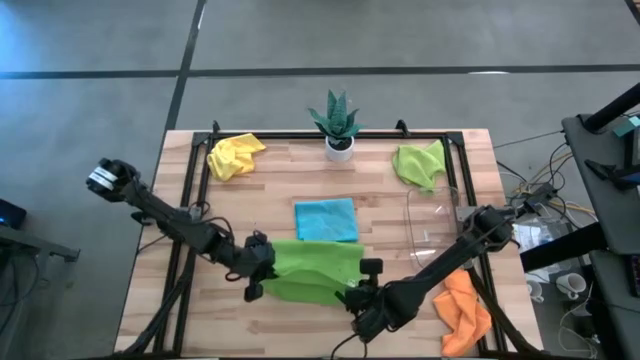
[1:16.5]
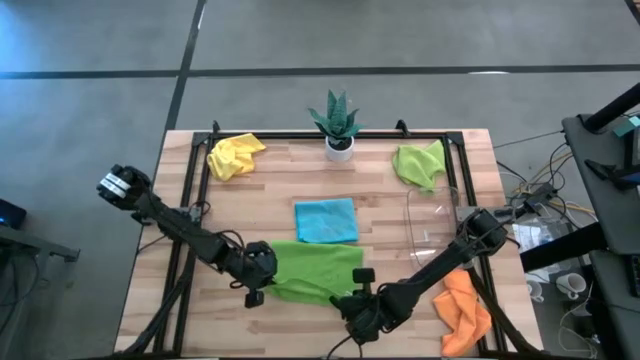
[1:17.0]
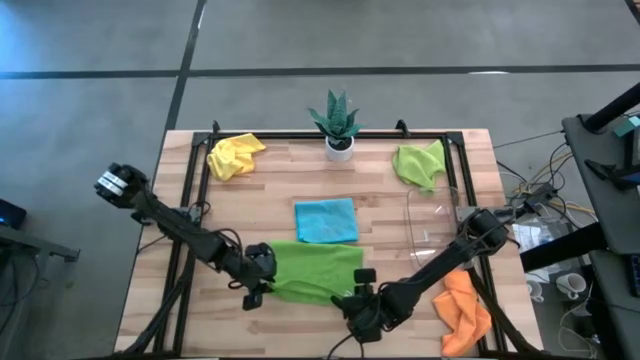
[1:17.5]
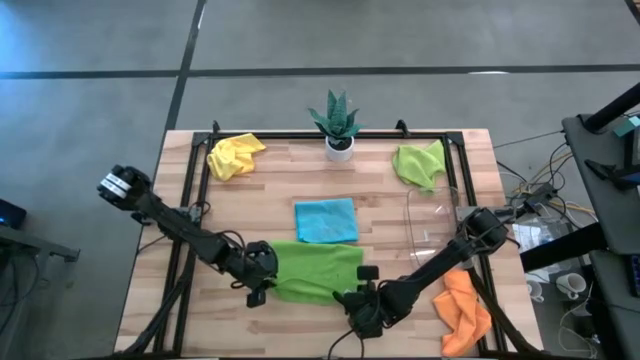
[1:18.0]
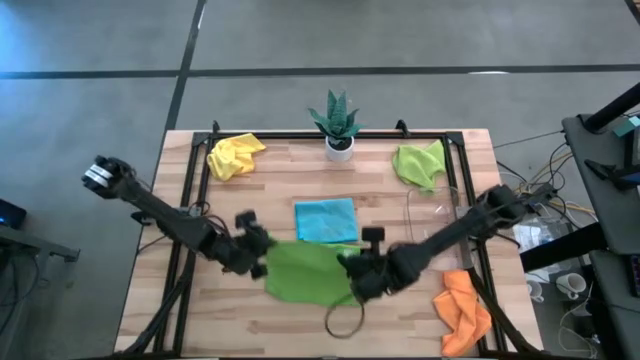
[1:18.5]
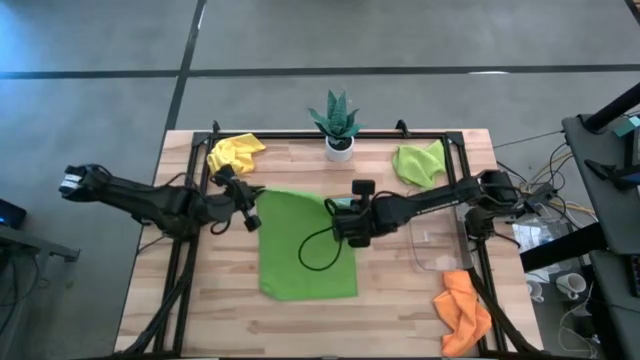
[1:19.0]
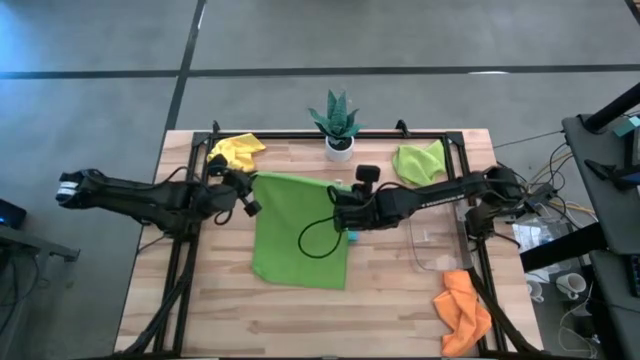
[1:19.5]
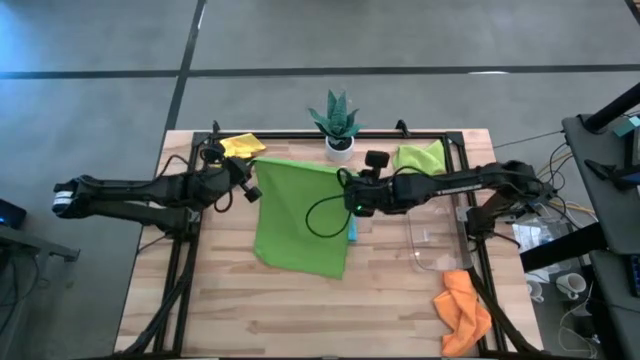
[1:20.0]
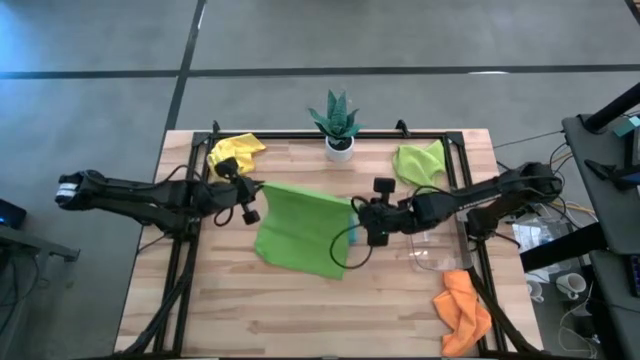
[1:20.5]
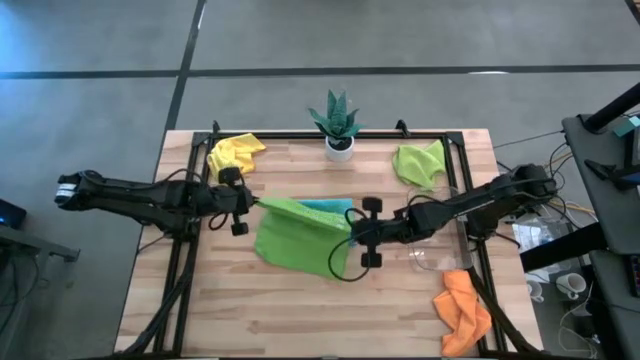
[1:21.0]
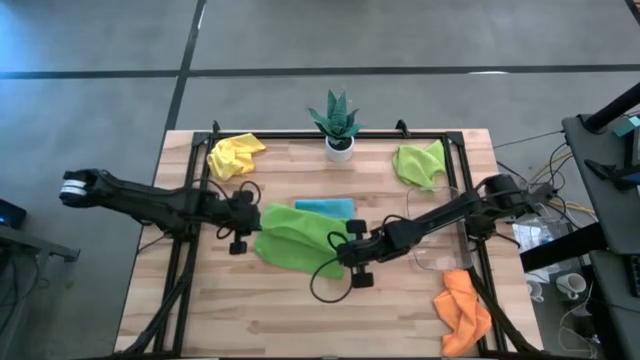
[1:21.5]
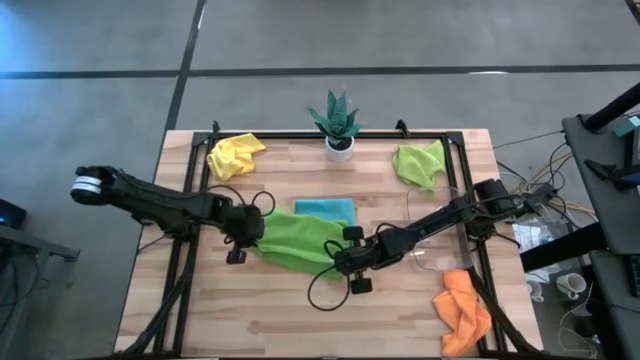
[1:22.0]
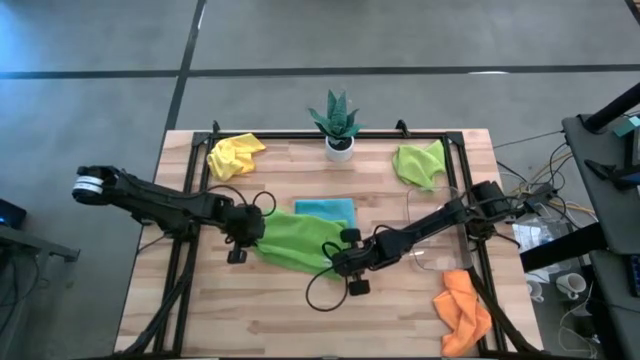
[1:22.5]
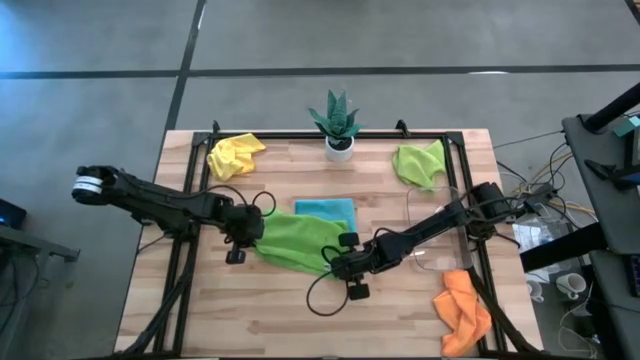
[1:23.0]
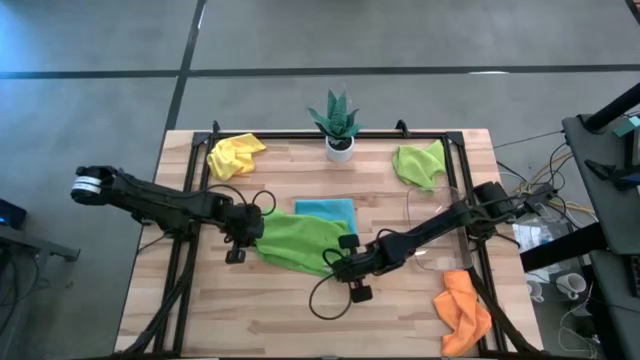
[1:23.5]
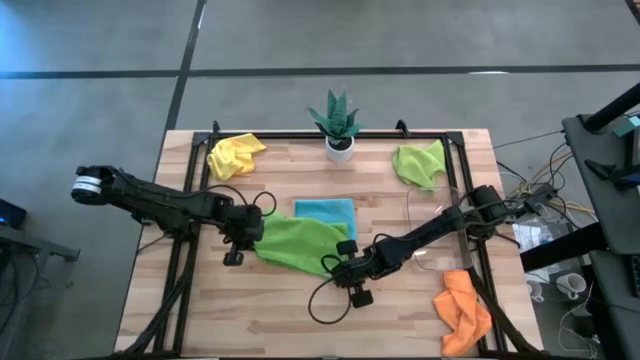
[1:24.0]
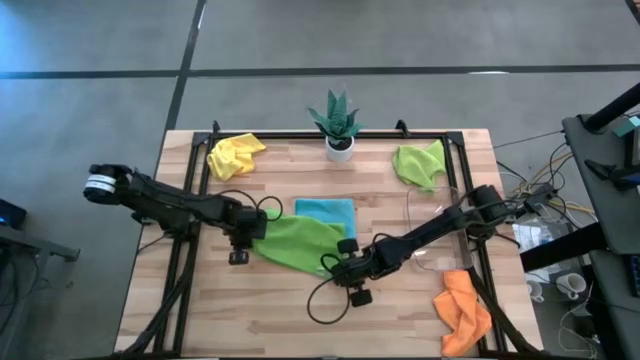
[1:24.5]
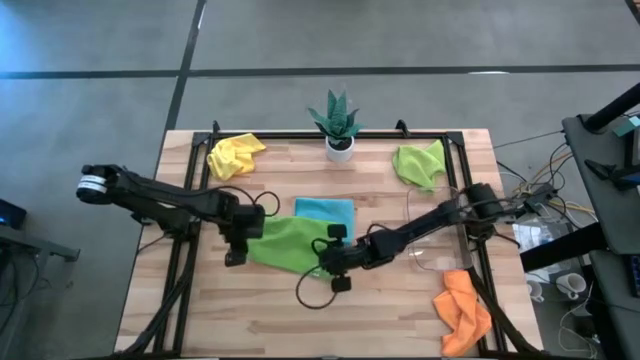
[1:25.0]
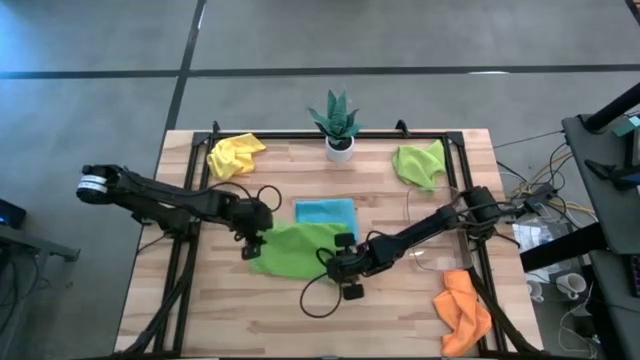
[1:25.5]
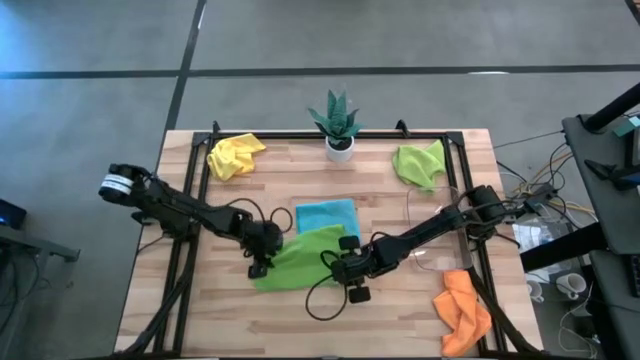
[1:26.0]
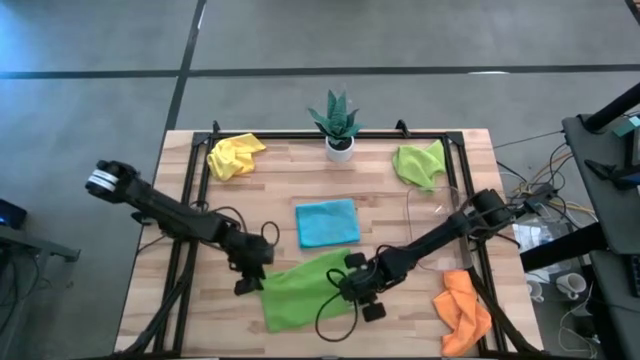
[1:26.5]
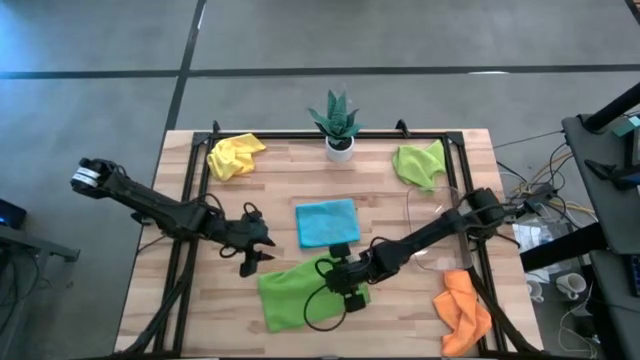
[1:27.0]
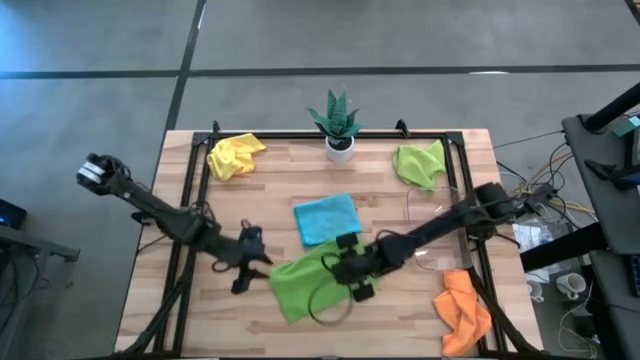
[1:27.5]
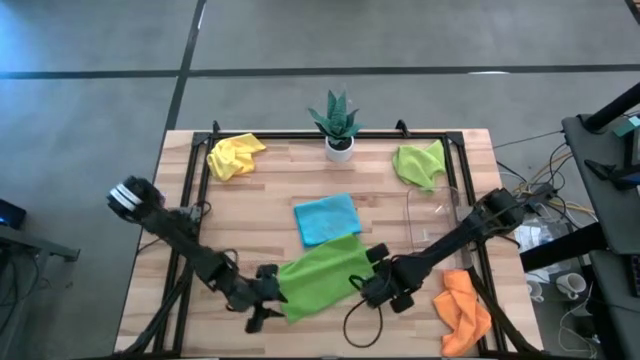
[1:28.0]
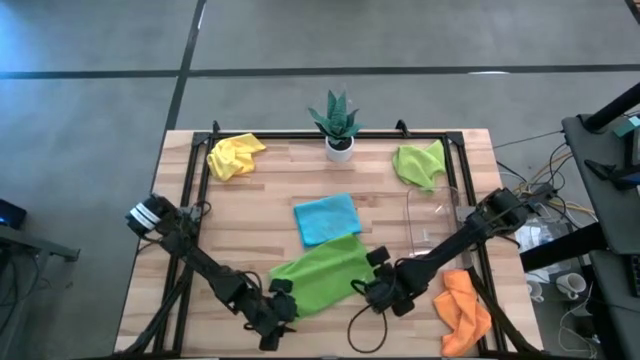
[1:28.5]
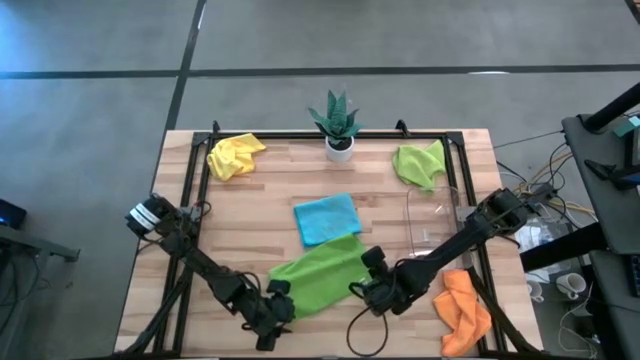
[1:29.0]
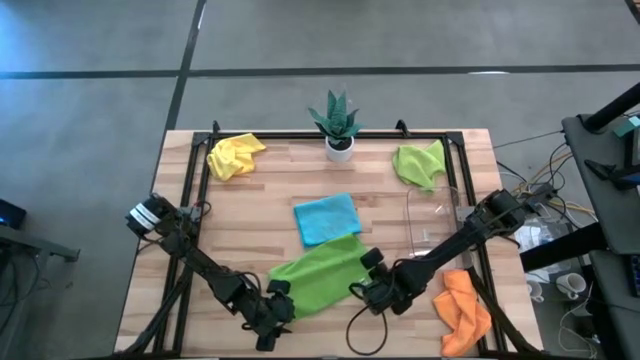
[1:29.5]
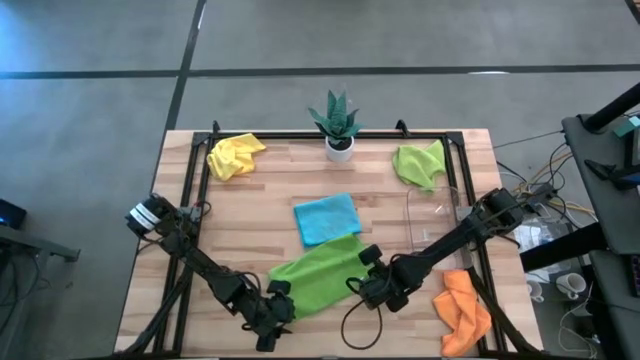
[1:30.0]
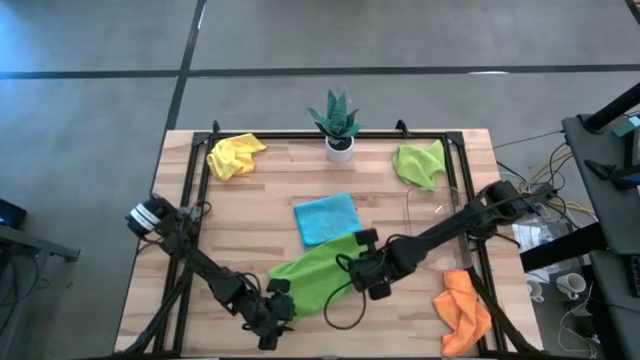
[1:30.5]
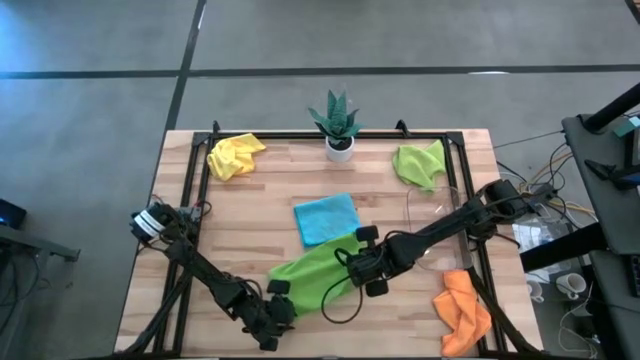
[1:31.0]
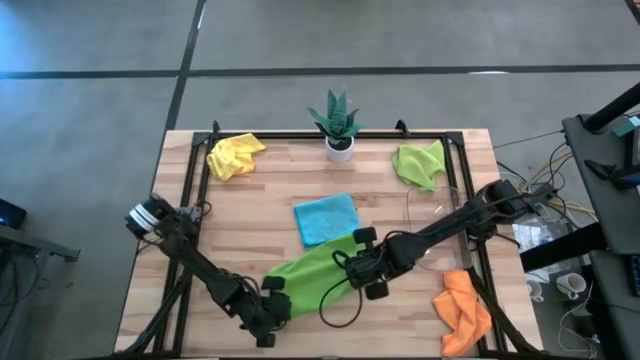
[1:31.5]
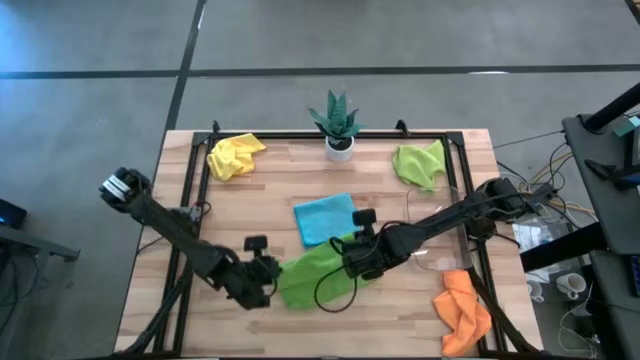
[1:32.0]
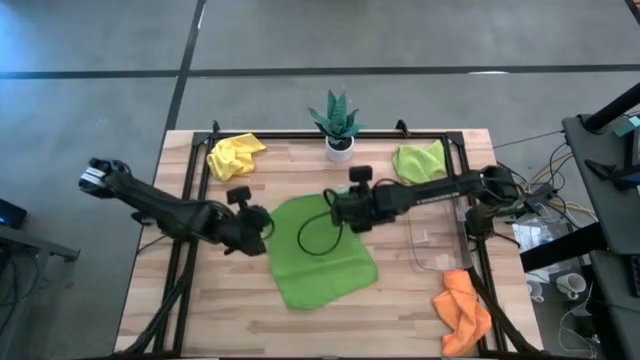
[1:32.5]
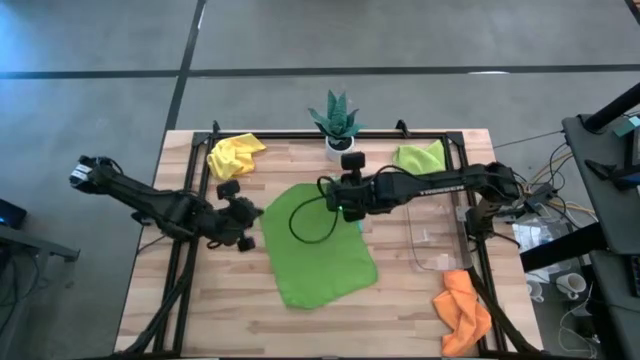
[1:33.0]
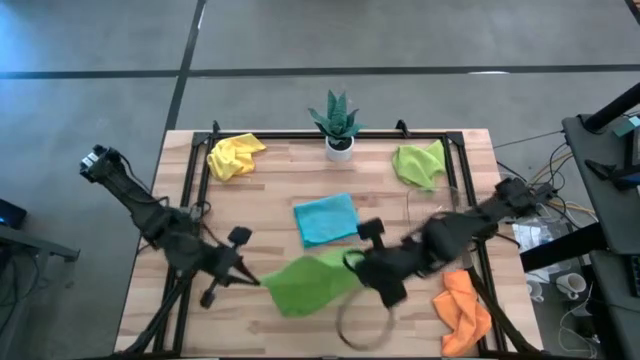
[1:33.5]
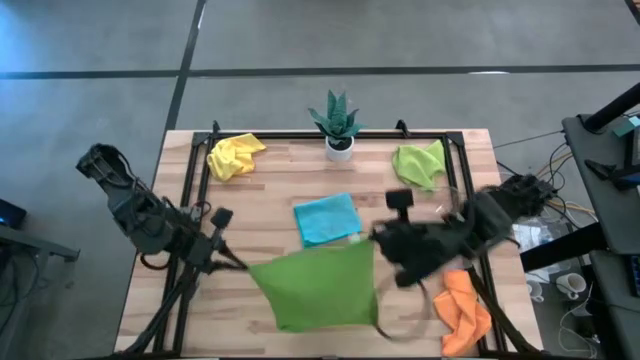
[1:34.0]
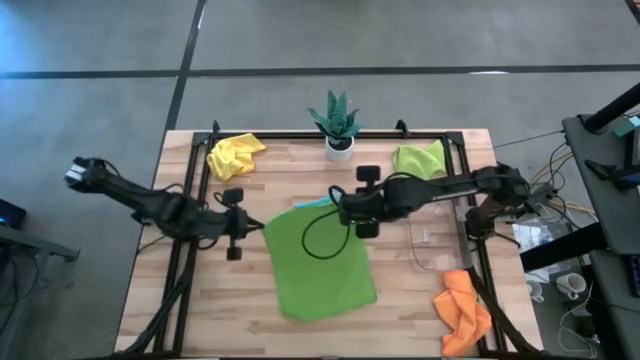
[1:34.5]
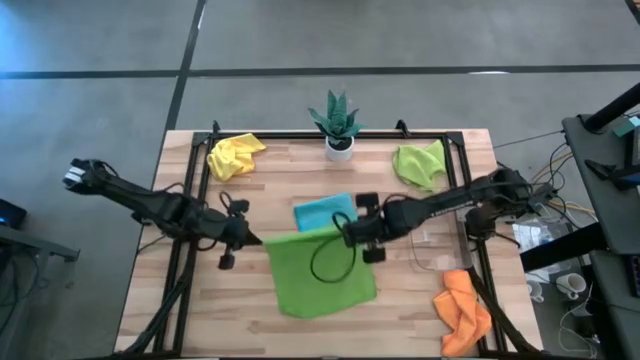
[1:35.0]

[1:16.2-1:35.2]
Task: Fold microfiber towels
Fold the green towel on the table

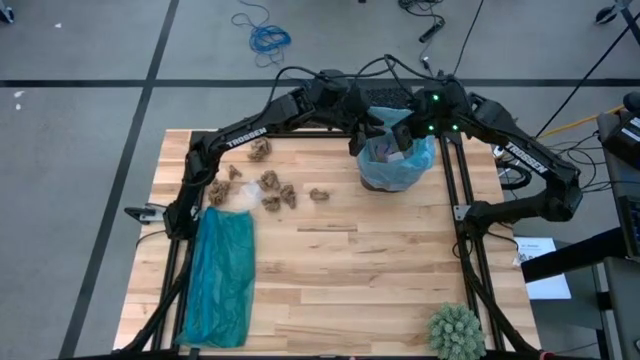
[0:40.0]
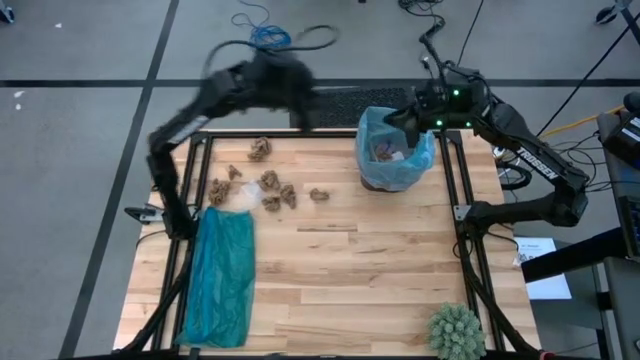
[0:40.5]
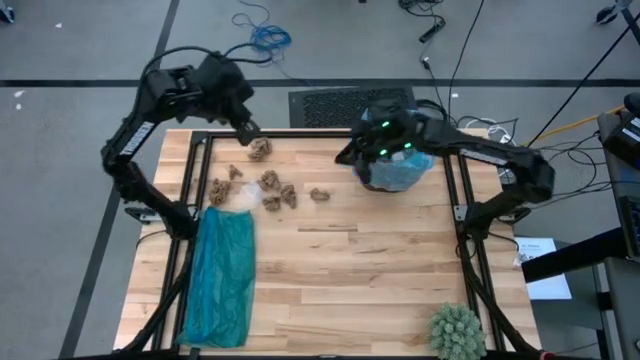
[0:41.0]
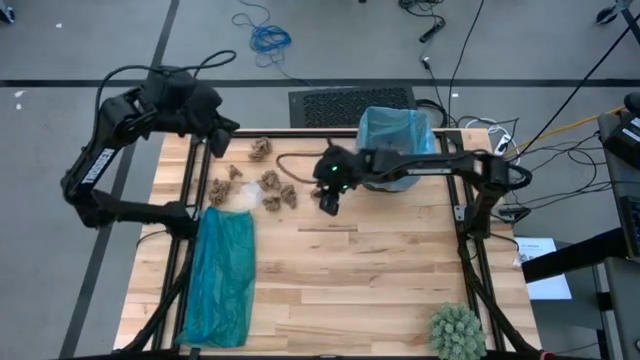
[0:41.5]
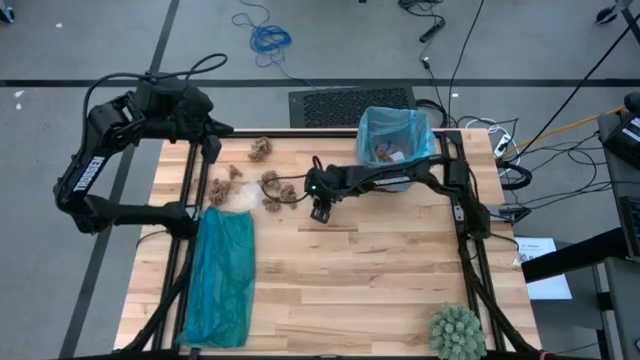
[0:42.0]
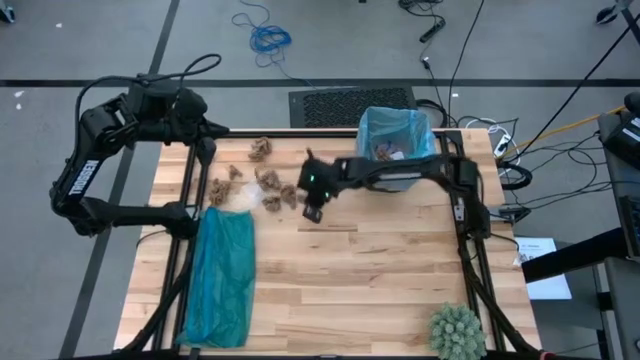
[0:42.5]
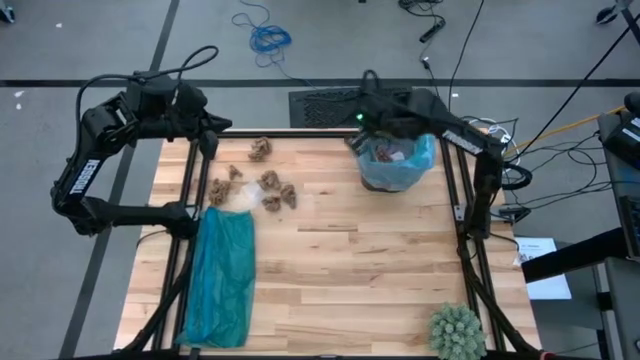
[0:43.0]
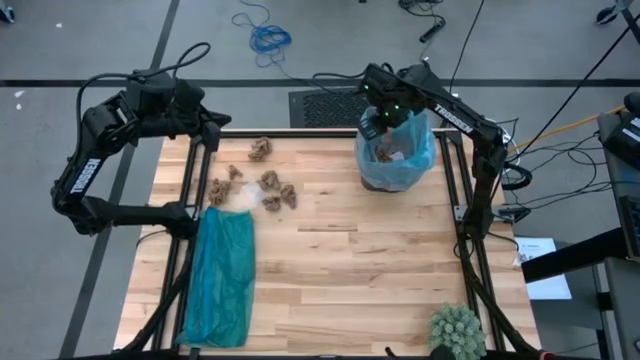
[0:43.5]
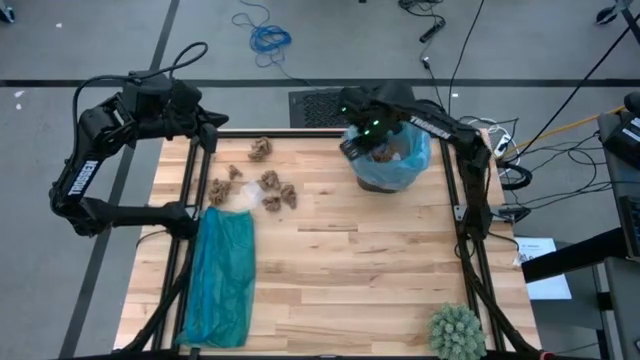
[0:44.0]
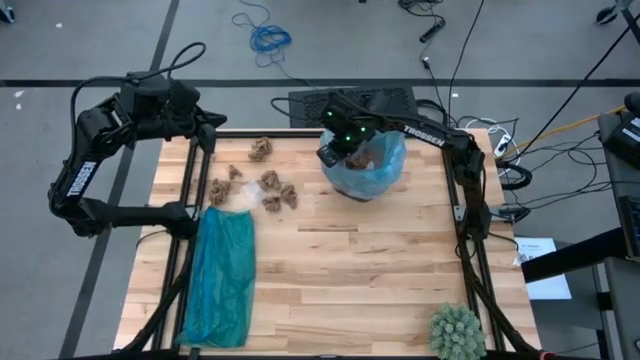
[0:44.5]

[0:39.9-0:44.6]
Task: place trash/remove bag and relplace
Put the brown napkin into the trash bin
